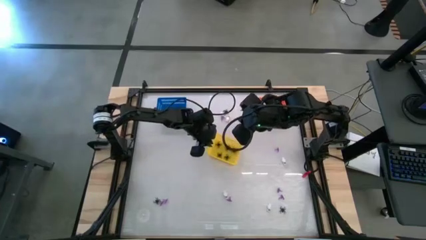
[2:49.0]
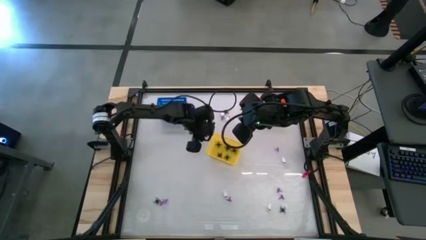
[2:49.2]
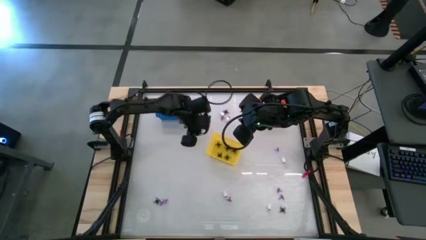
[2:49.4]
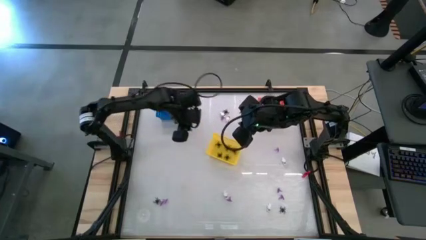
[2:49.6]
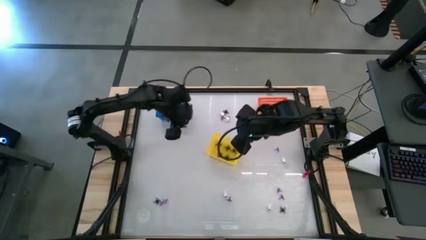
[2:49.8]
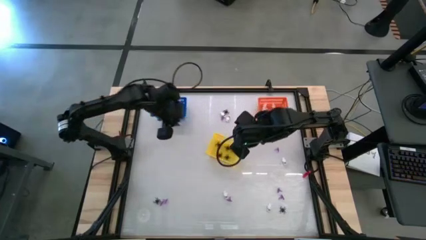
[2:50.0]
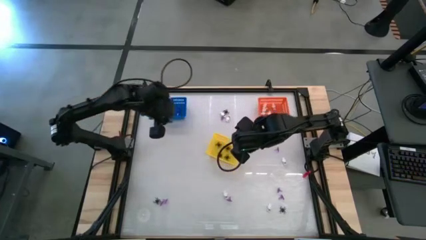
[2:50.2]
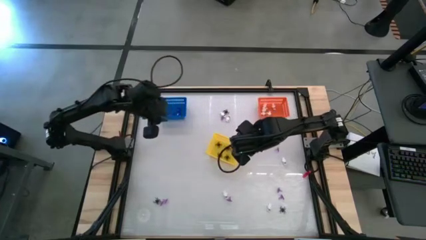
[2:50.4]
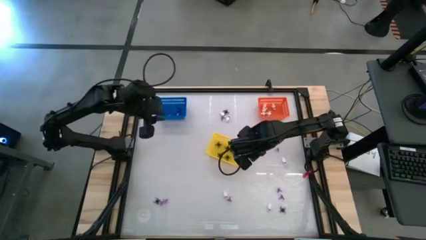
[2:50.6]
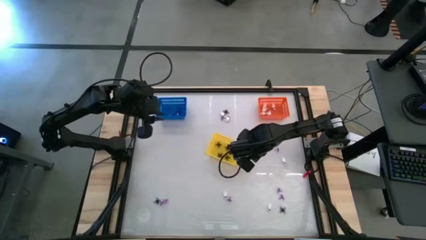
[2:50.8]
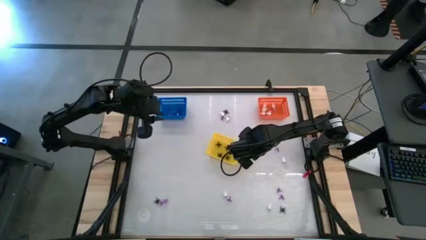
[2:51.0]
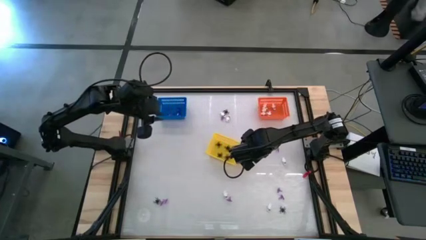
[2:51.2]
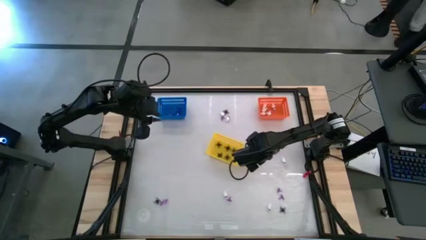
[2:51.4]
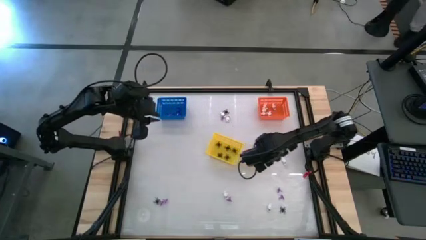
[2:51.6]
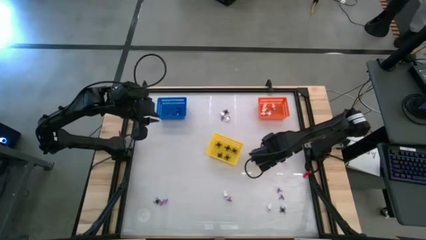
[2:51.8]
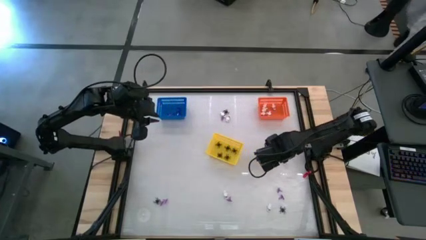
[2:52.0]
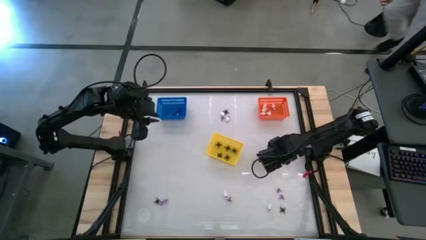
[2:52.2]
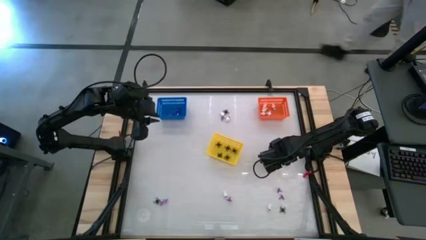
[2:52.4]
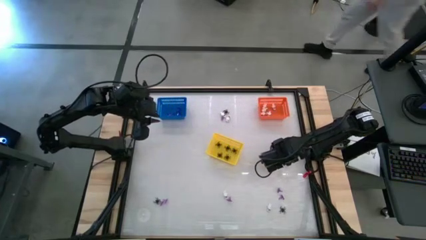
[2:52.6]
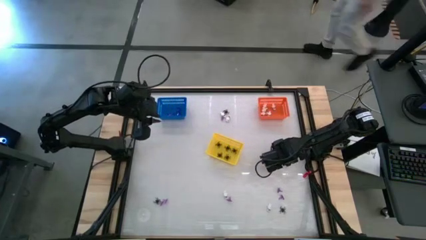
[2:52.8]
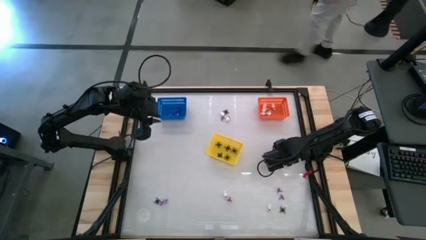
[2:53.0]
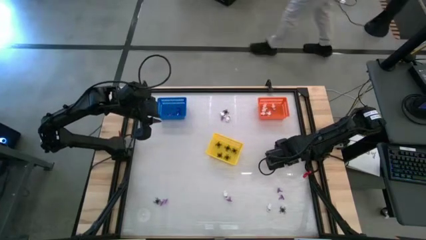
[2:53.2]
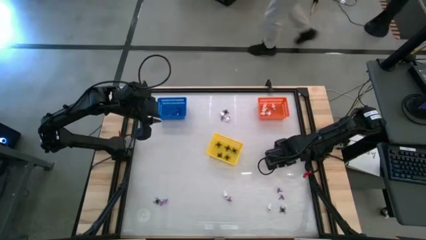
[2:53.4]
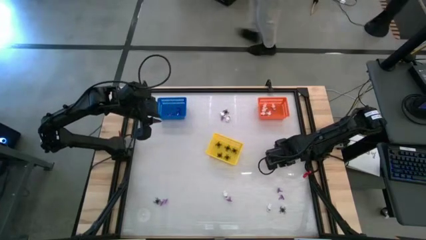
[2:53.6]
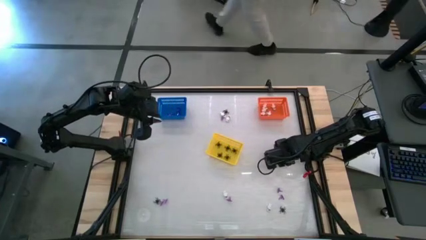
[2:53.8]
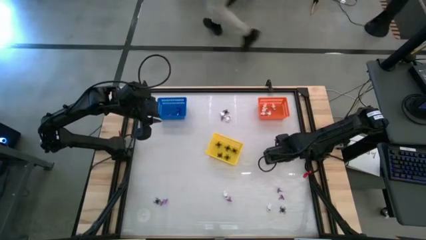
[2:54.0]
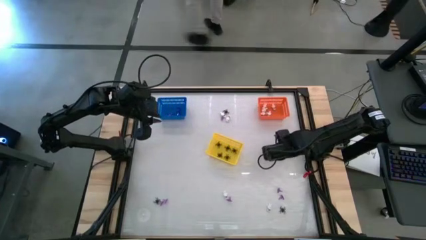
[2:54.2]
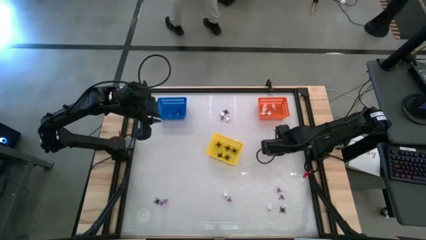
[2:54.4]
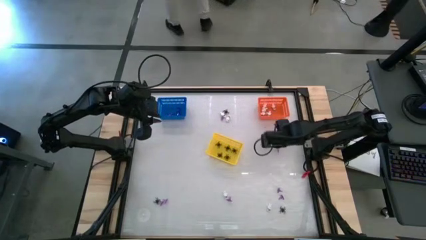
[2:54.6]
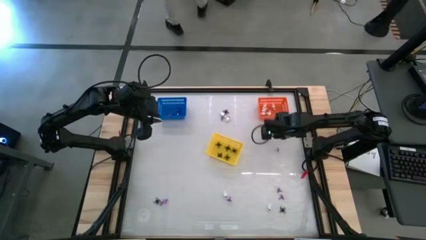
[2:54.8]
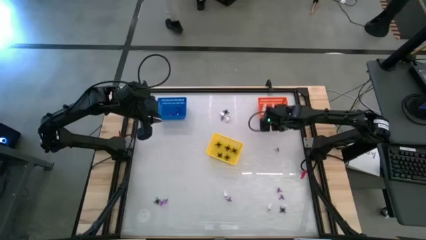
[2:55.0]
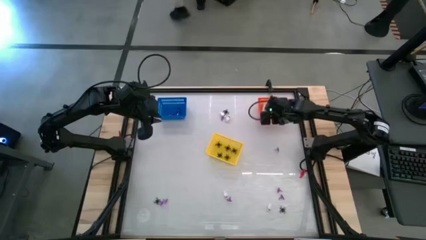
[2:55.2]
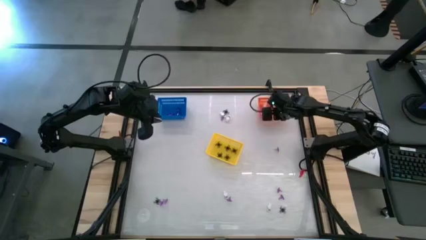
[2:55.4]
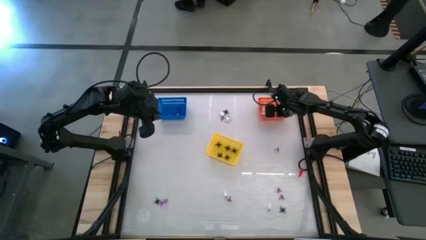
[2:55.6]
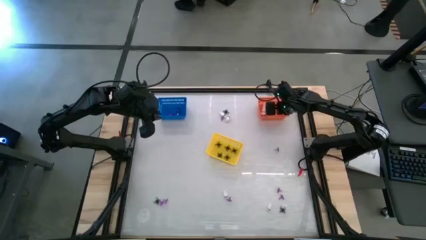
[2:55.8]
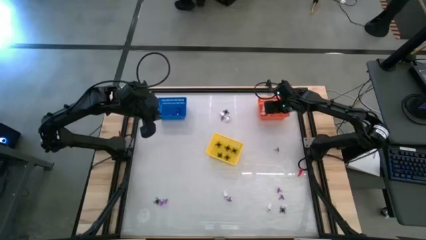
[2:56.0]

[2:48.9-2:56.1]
Task: Sort Halloween decoration
Put the white skeleton toy into the orange bin

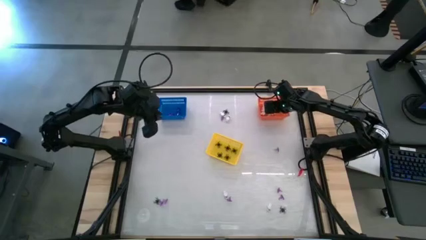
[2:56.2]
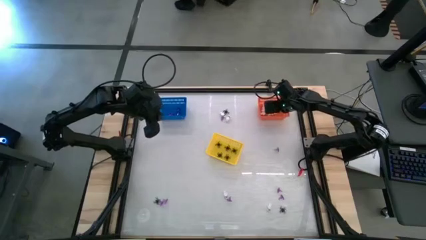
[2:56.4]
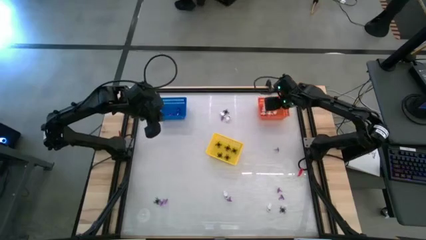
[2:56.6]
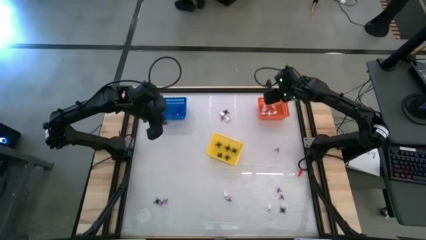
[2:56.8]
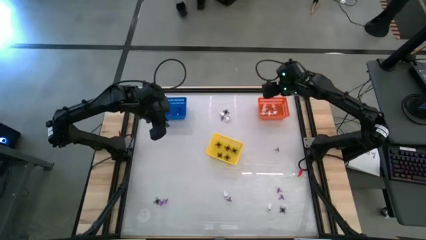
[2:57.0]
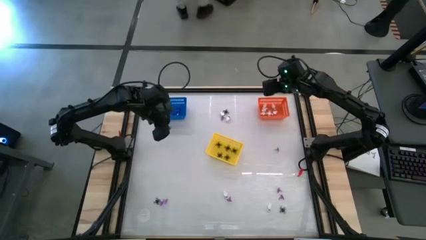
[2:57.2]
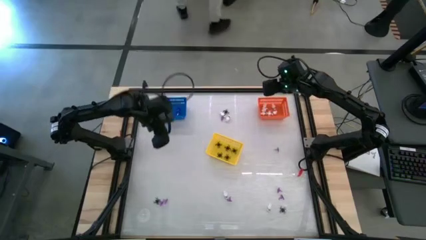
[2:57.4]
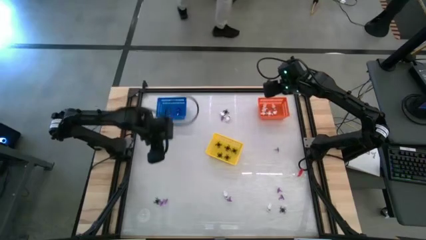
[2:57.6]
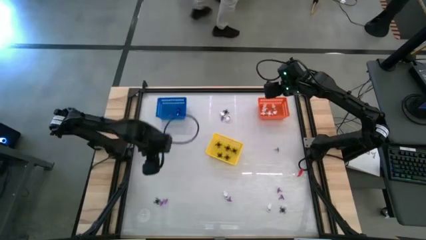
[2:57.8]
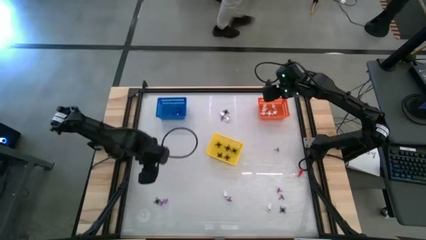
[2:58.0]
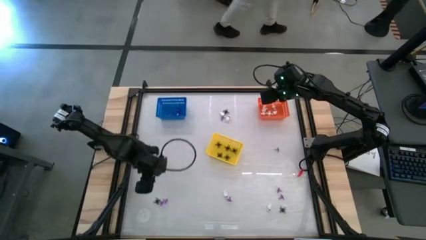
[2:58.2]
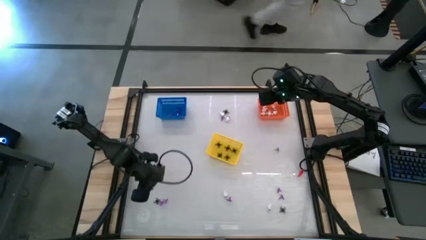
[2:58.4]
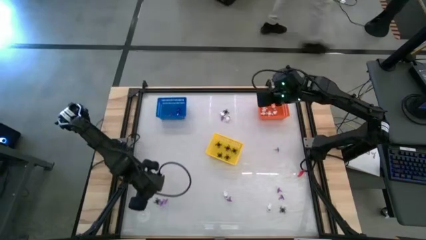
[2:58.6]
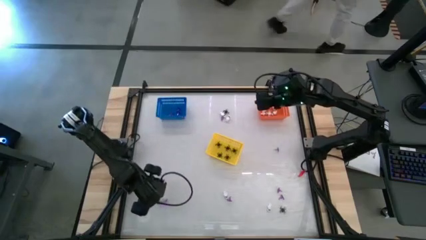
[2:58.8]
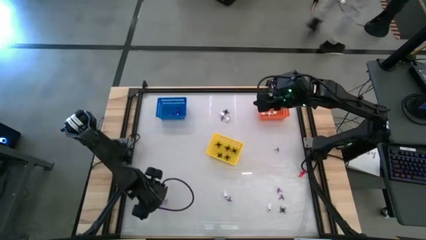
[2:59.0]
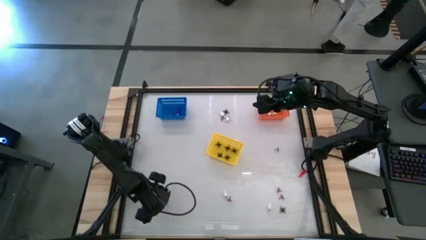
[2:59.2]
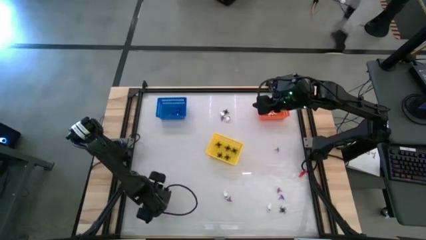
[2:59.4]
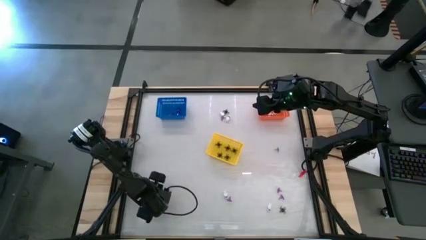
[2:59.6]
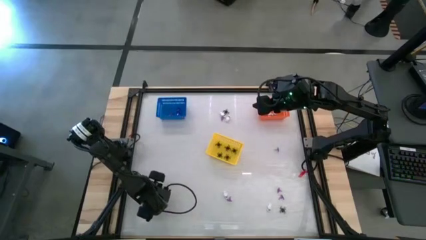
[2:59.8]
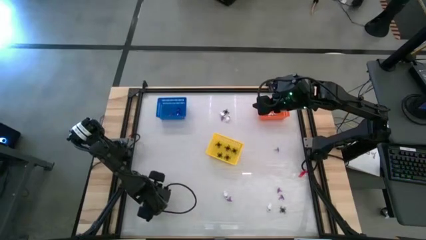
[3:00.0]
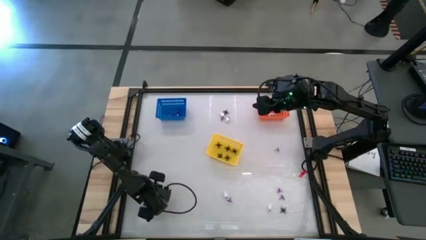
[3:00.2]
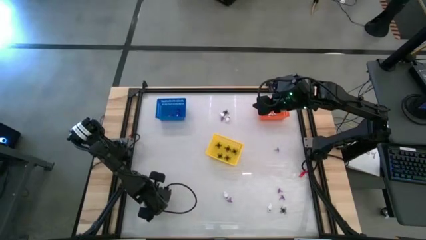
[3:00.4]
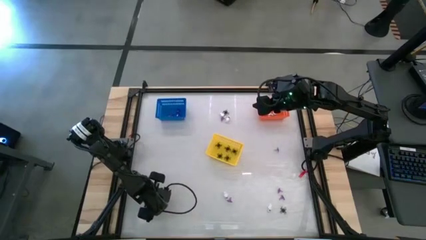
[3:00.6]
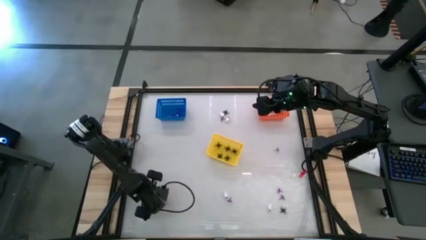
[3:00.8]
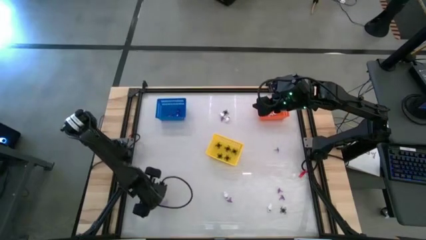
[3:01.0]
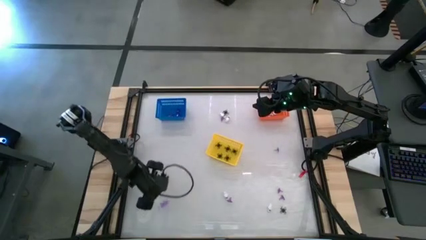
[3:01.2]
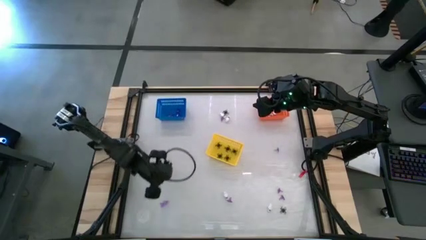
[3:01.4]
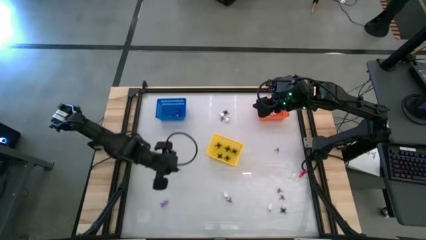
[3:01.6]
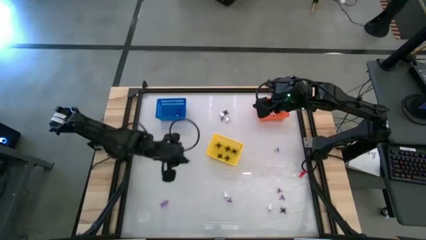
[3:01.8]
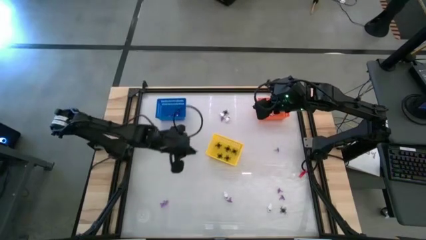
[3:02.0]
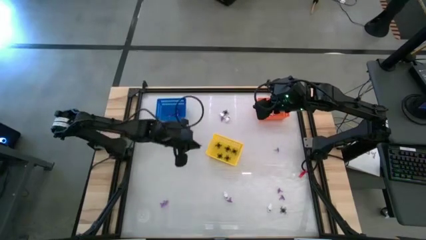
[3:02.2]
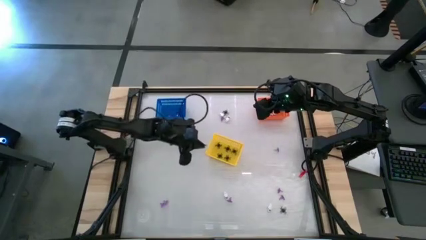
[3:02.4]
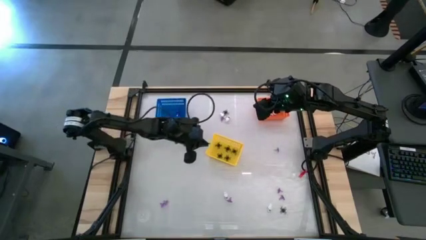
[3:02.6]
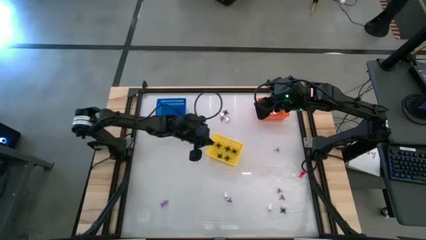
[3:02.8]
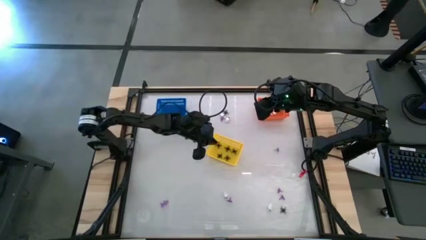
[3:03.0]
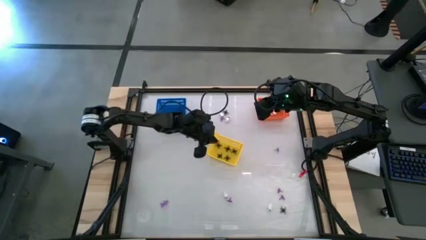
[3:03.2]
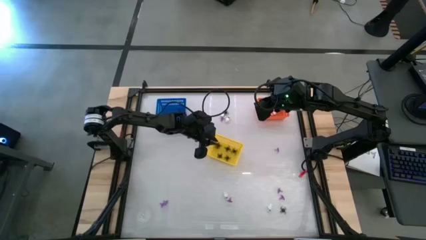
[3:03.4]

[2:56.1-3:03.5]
Put the black spider toy into the yellow bin
